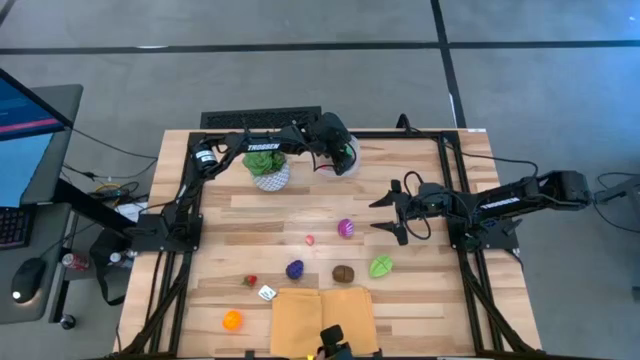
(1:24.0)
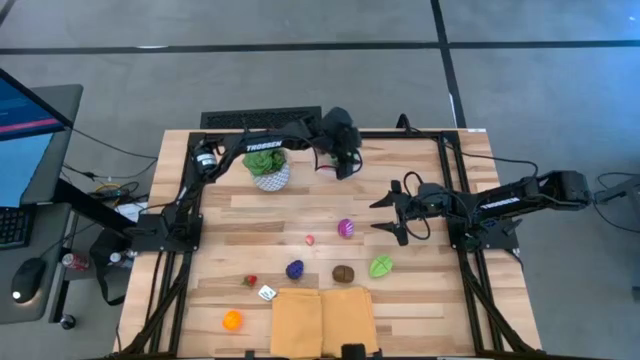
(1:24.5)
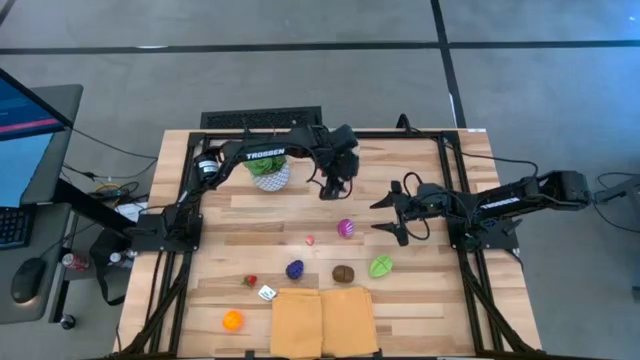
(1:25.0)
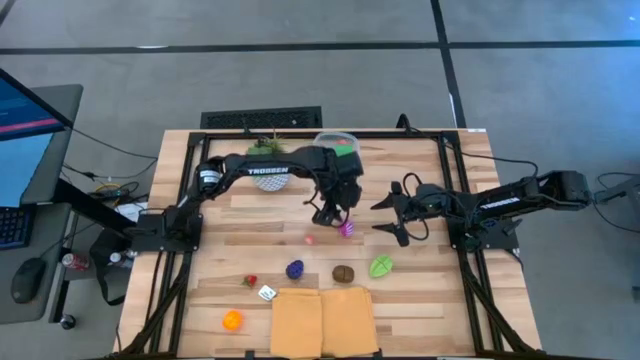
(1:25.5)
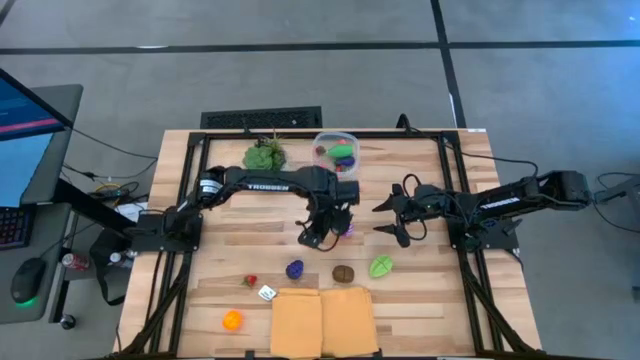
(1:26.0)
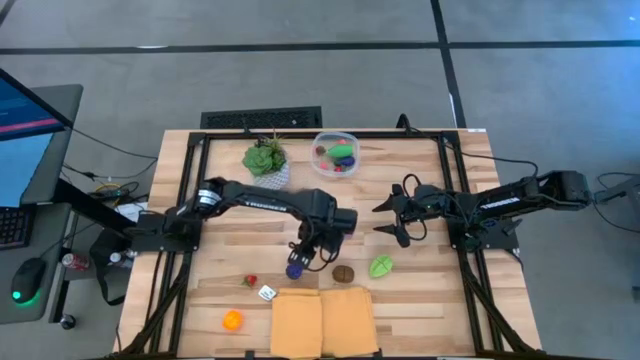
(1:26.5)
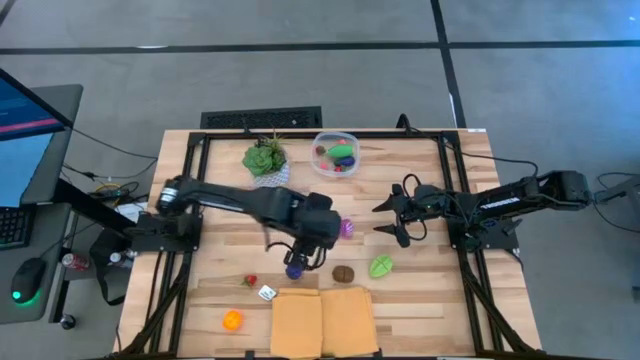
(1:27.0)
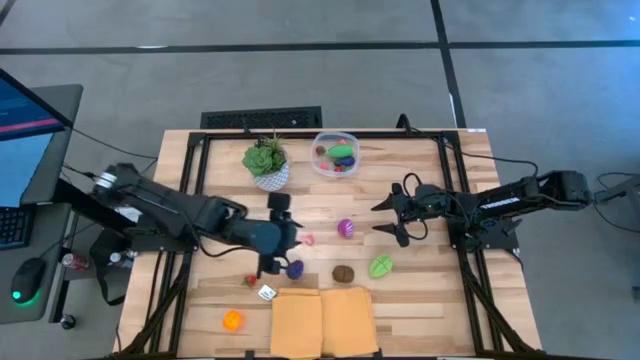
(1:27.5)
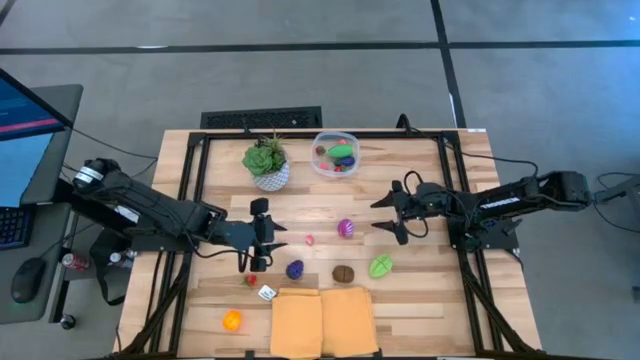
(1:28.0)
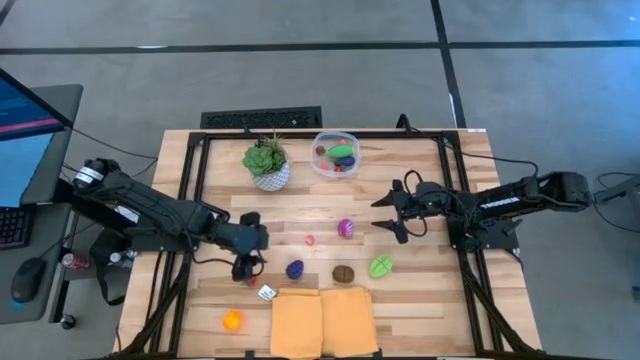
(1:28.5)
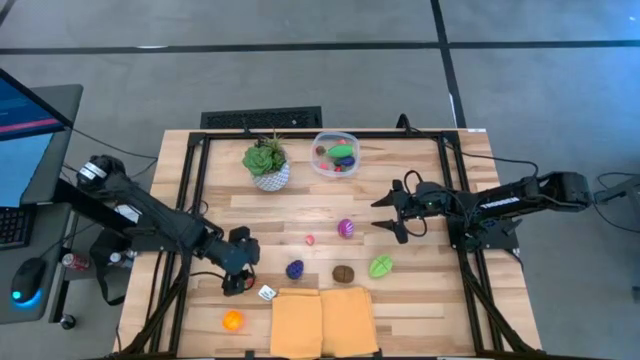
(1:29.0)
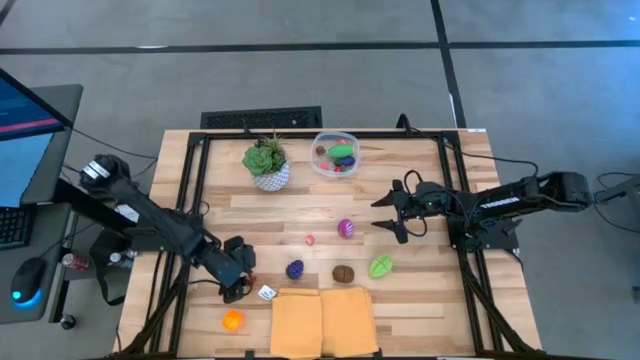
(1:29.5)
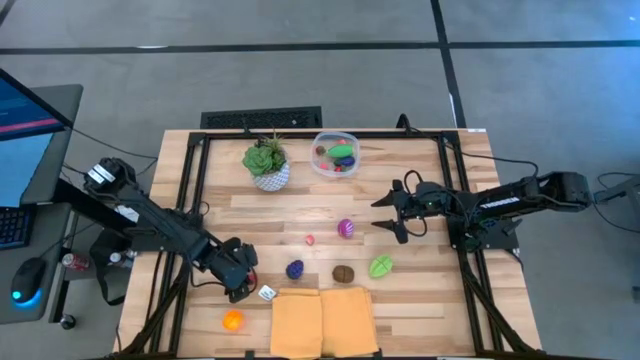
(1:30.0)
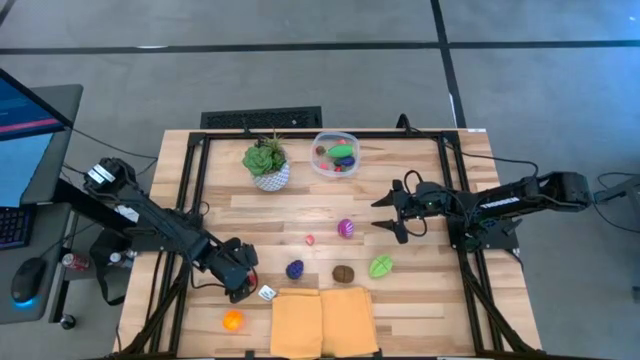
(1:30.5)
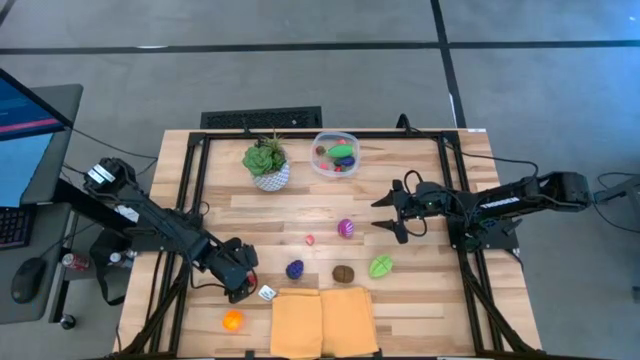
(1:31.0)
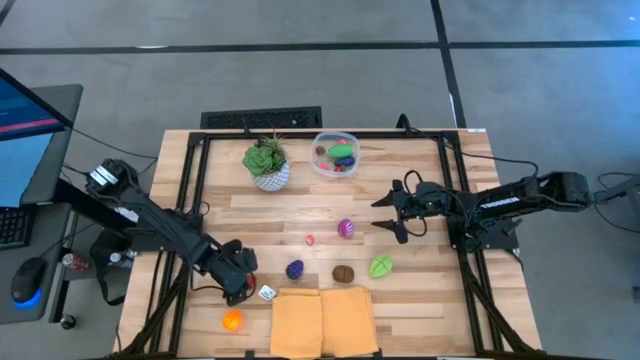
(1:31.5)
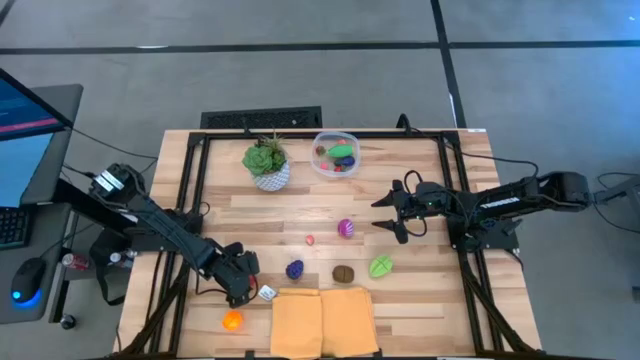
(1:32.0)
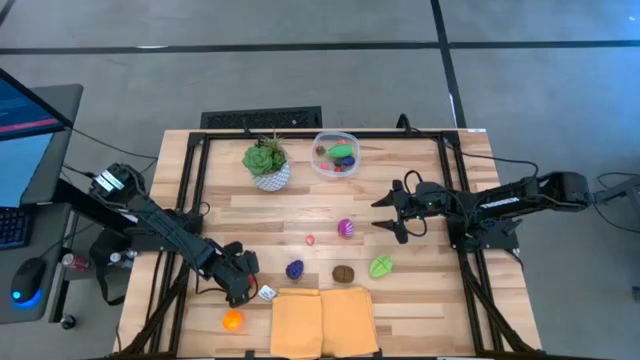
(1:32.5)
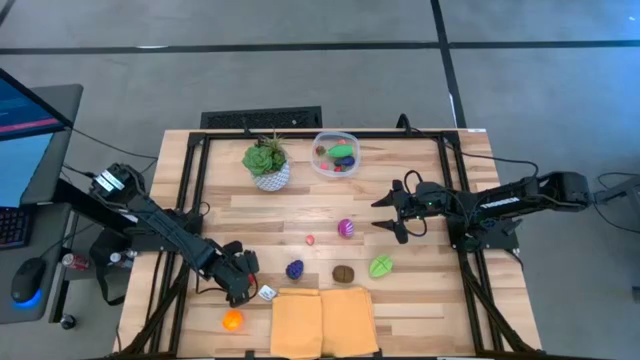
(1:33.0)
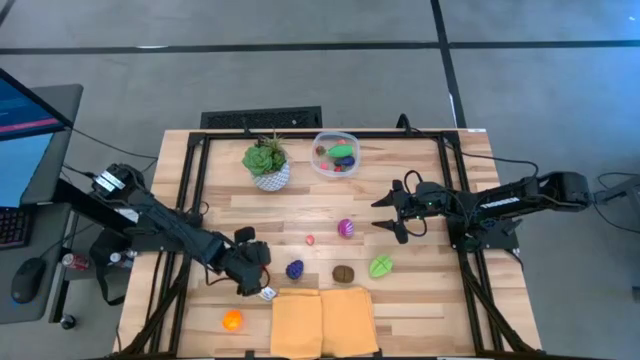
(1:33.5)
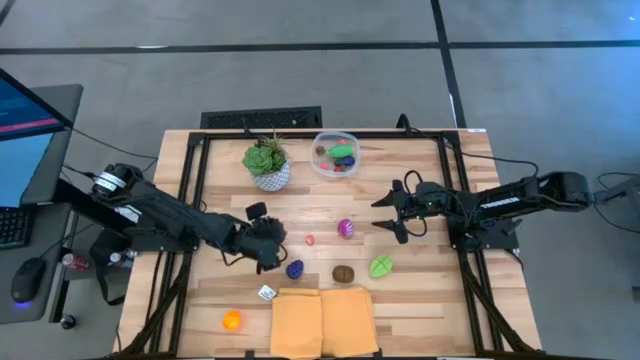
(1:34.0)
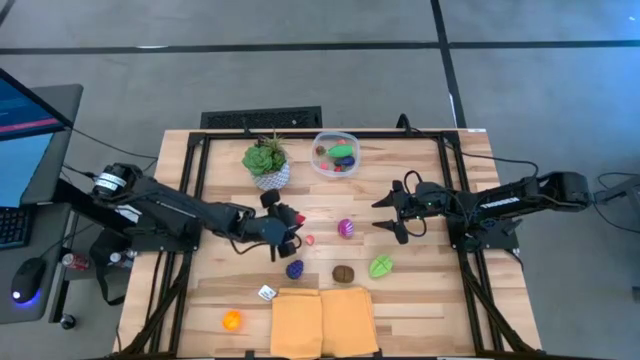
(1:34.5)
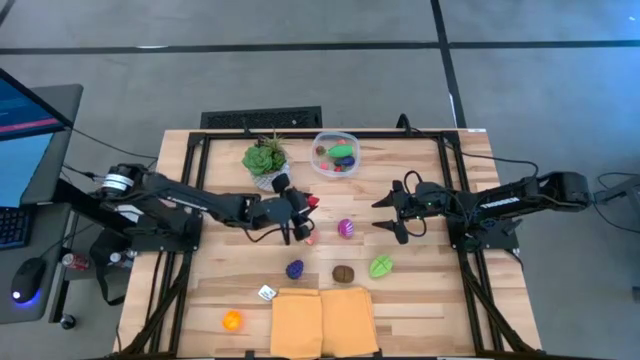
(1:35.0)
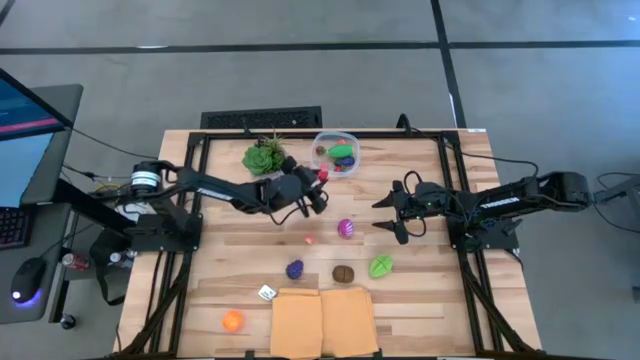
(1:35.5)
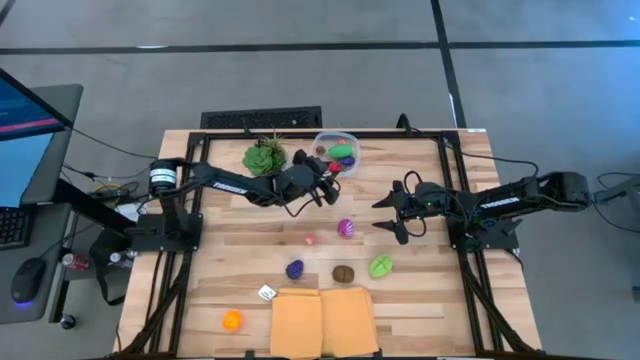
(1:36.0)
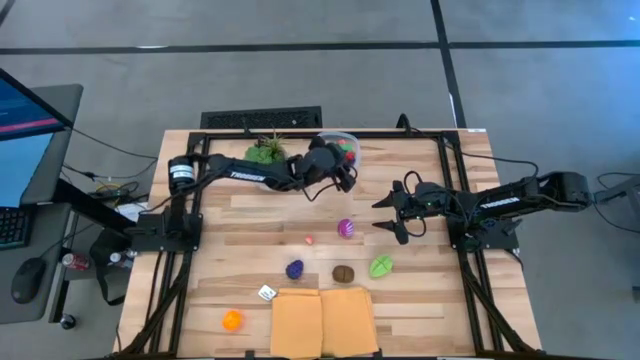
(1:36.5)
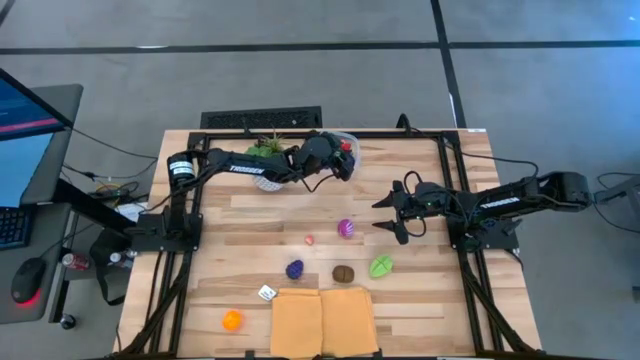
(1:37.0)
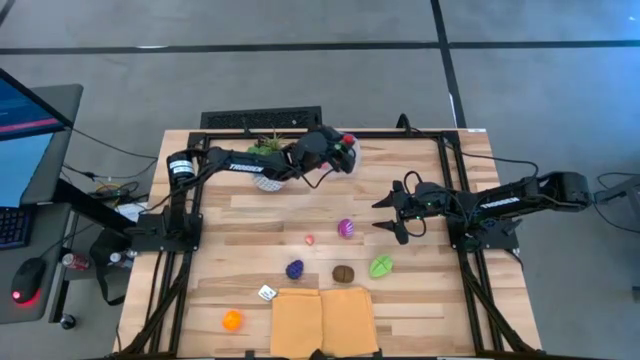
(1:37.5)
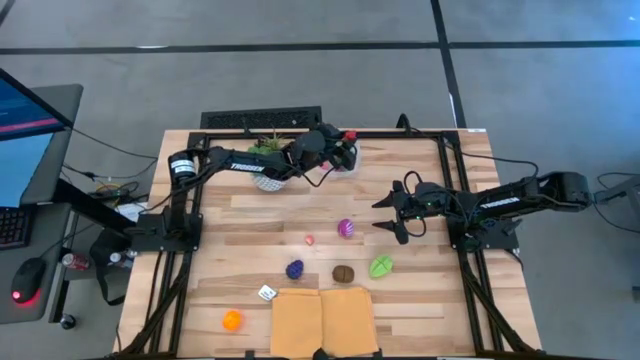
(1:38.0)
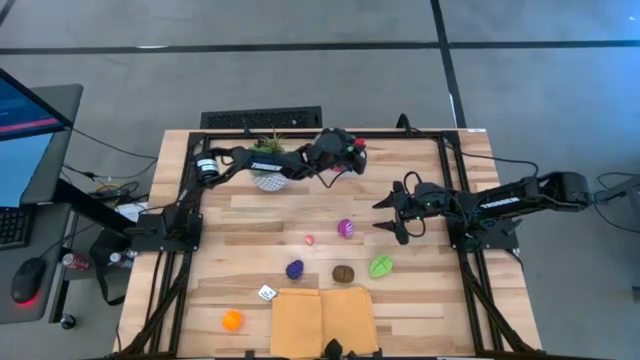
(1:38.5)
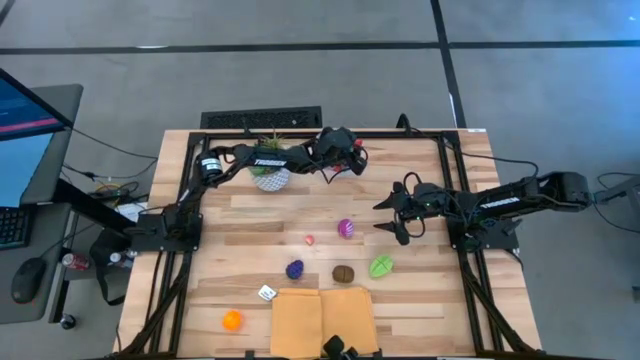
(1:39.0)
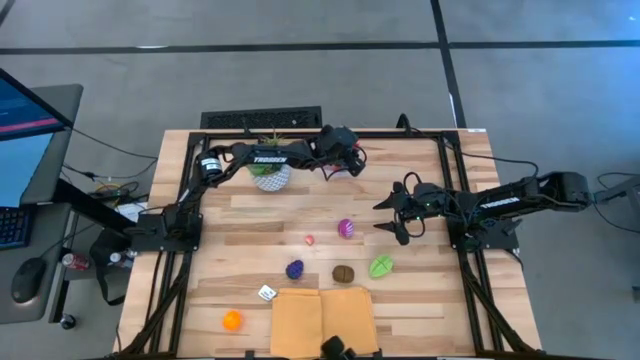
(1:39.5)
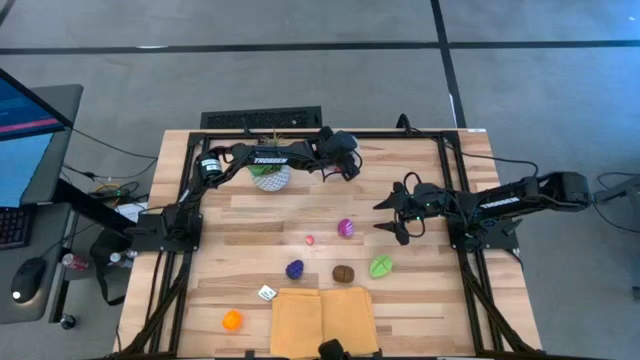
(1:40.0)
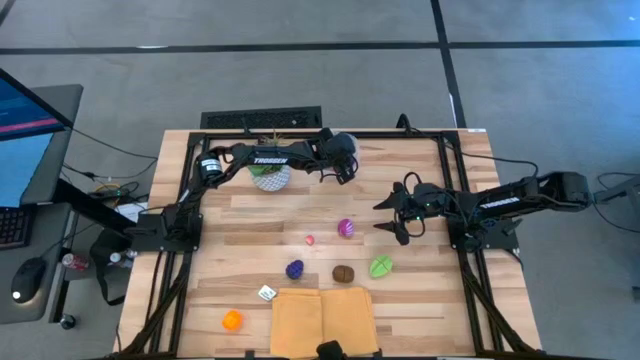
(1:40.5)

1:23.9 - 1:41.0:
Task: Pick and placing Produce into tupperware
Put the strawberry into the transparent bin
